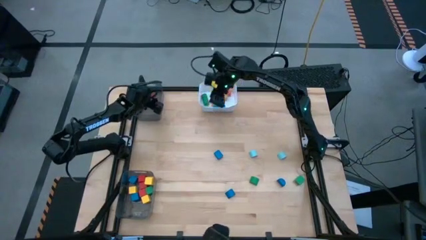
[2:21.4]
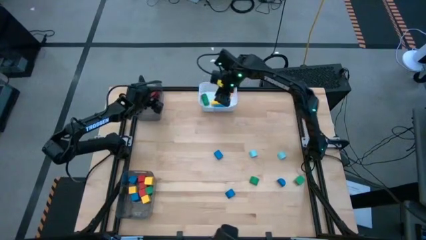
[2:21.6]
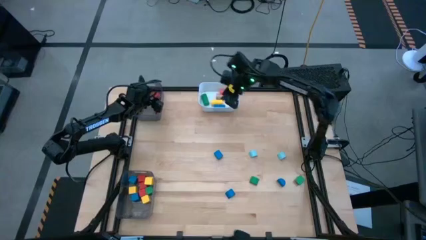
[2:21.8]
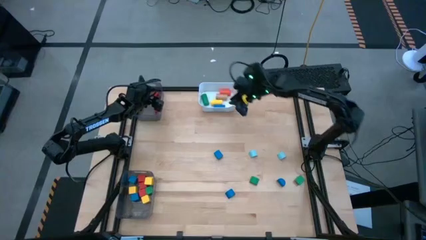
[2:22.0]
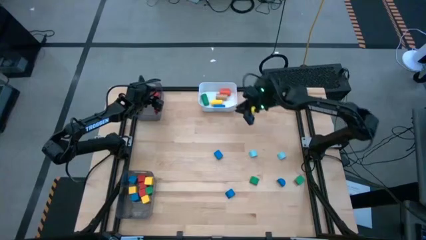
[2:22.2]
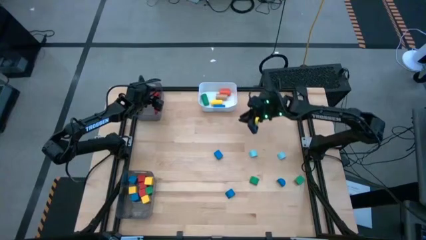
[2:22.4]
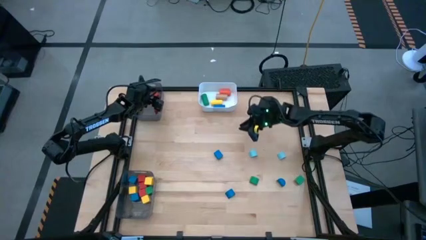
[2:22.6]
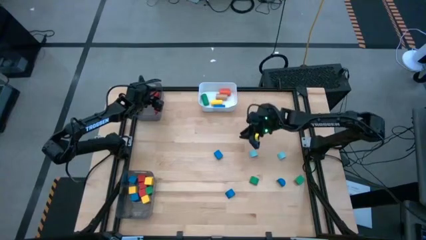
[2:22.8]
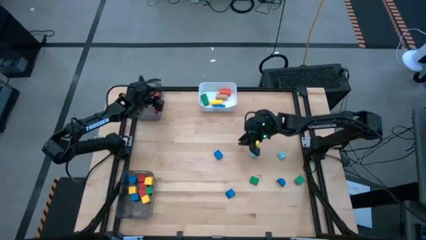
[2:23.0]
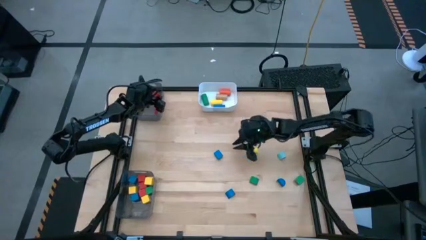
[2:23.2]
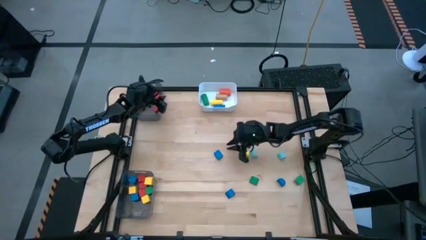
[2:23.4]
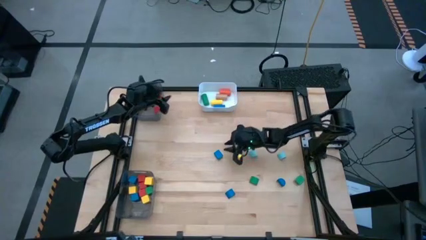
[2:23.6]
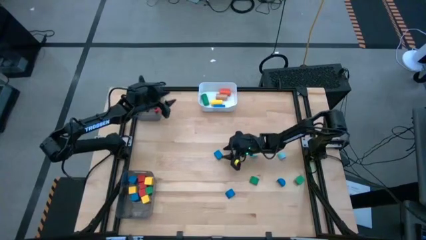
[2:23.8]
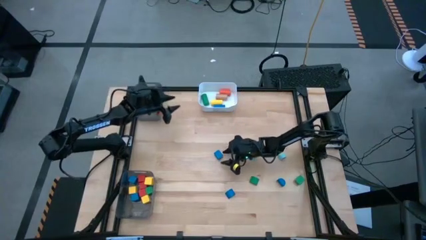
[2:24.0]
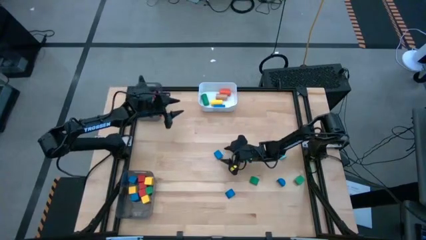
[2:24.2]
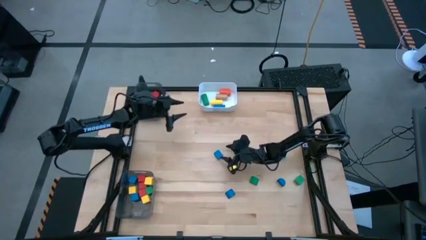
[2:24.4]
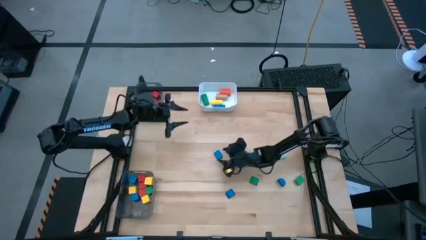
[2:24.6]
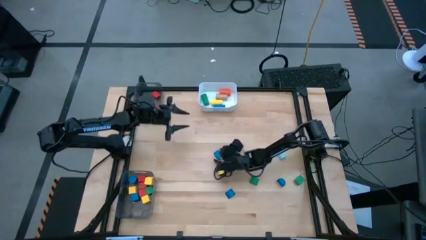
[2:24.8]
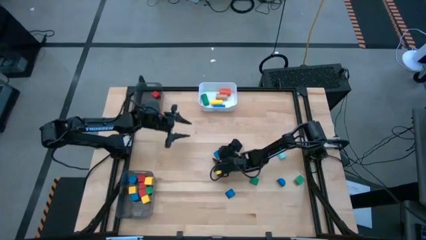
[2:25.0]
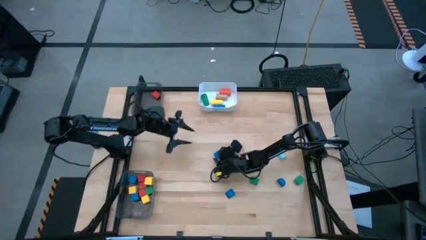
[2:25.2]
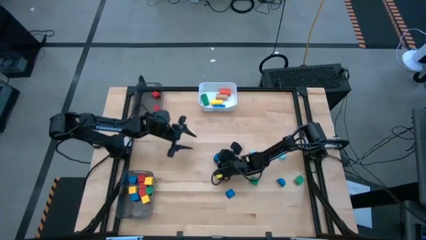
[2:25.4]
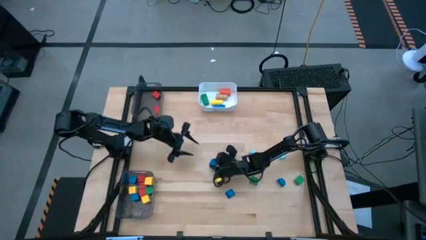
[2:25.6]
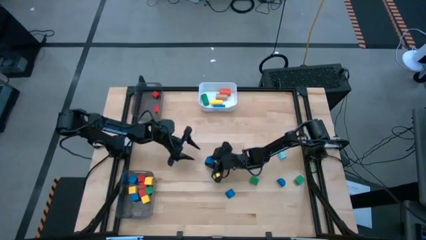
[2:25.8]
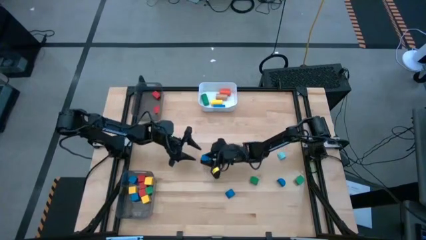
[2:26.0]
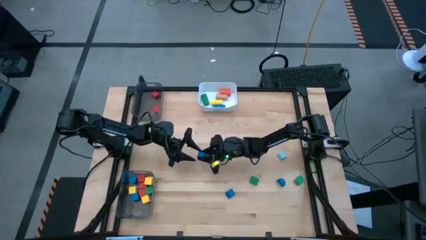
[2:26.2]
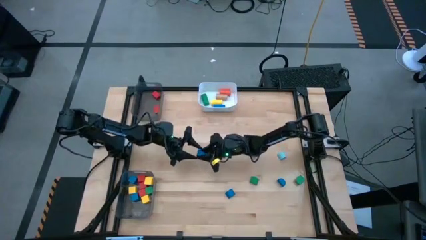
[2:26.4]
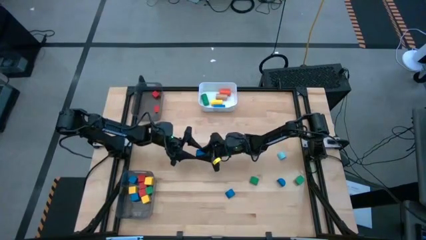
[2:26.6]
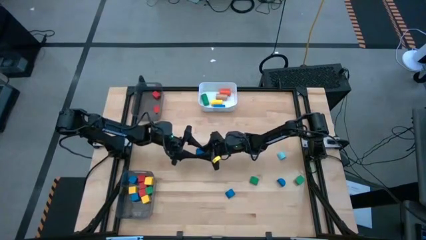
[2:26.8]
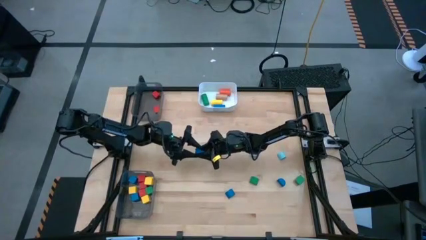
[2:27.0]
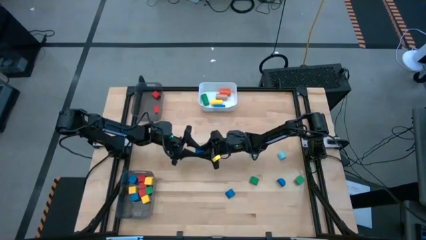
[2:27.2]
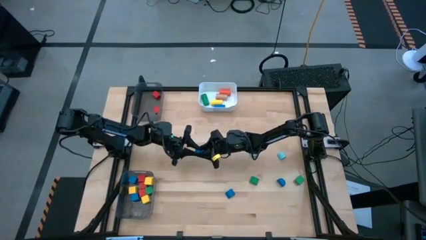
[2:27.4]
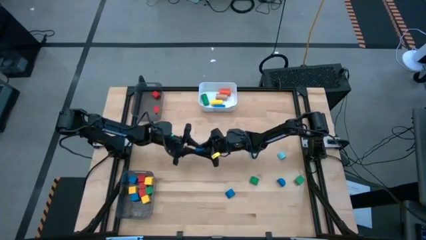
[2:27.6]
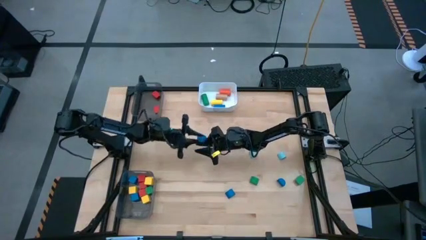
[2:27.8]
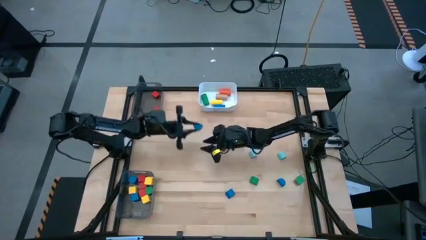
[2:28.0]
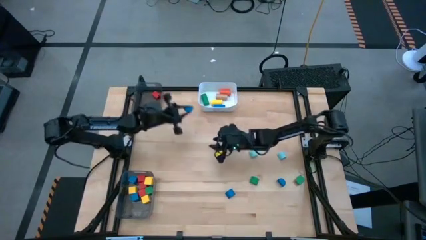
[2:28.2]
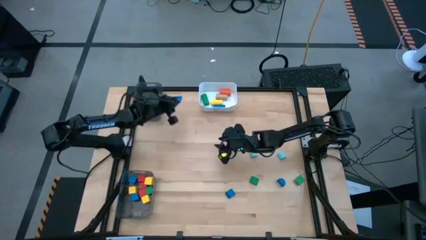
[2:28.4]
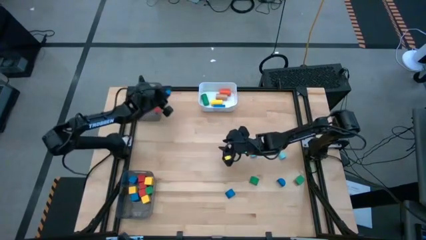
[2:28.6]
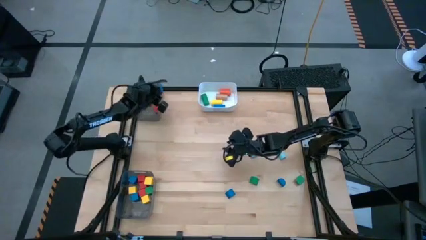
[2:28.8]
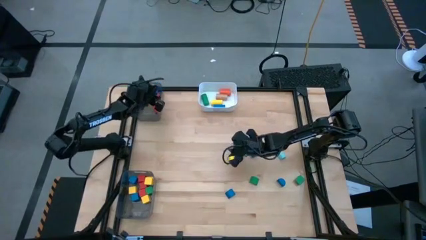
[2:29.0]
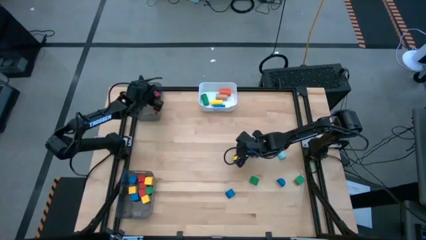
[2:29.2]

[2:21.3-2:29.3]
Task: Sort blocks by size
Put the dark blue semicircle block into the top black bin

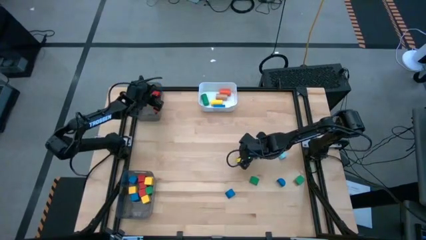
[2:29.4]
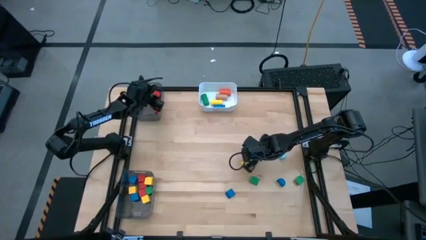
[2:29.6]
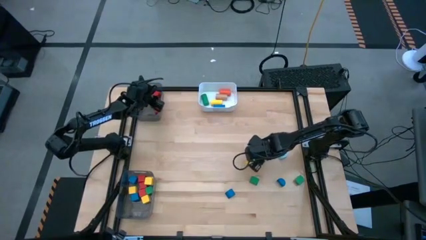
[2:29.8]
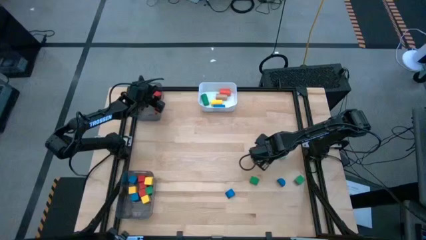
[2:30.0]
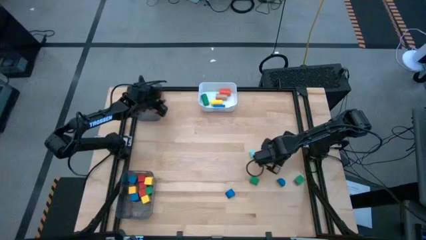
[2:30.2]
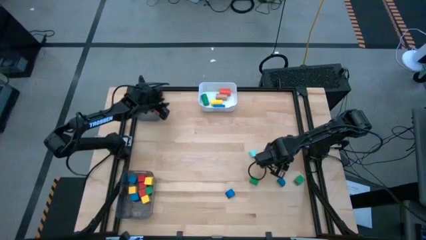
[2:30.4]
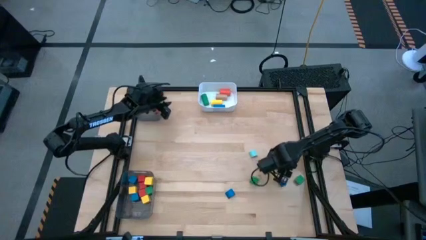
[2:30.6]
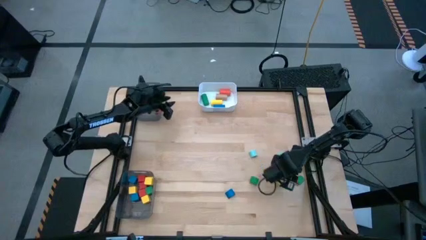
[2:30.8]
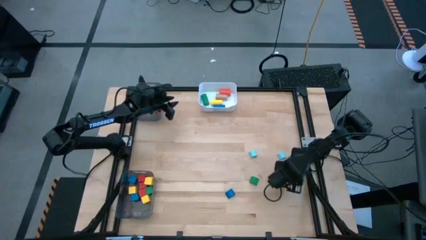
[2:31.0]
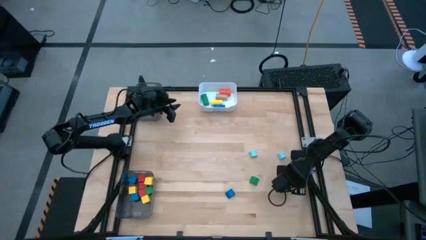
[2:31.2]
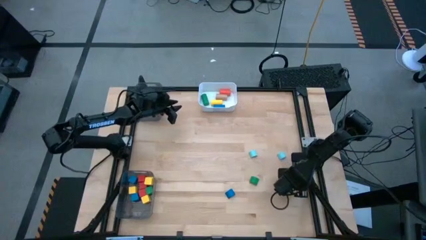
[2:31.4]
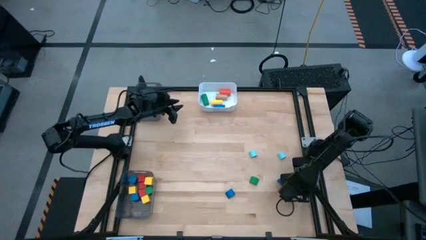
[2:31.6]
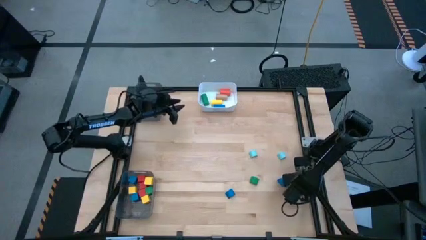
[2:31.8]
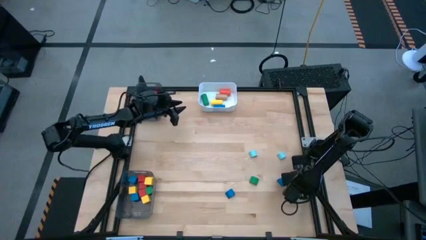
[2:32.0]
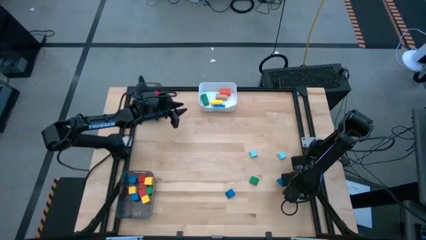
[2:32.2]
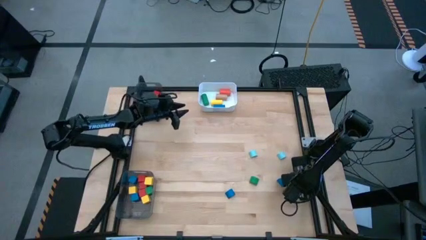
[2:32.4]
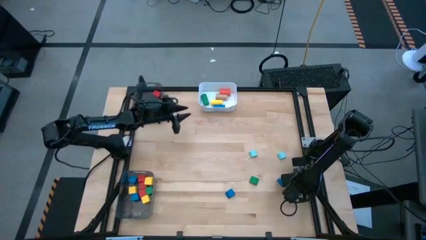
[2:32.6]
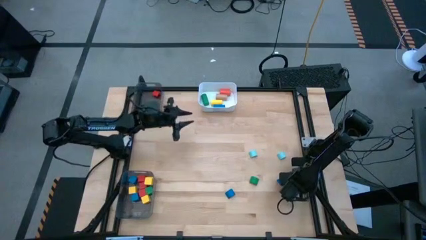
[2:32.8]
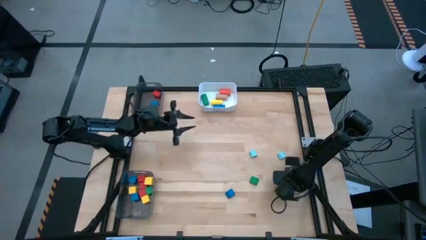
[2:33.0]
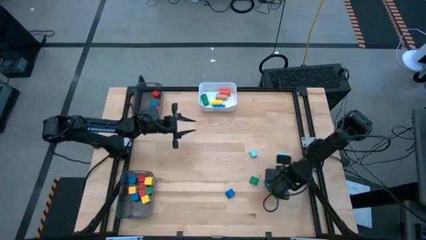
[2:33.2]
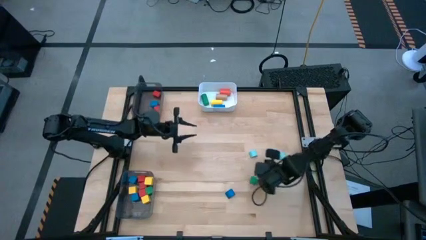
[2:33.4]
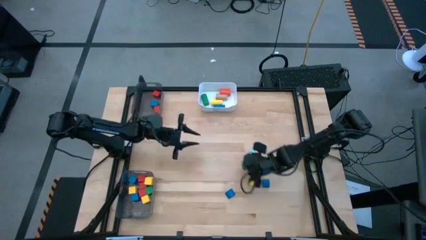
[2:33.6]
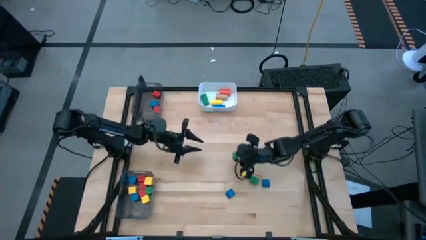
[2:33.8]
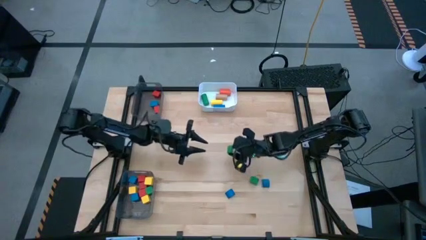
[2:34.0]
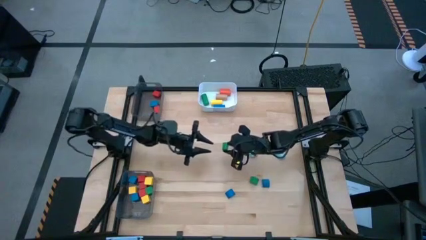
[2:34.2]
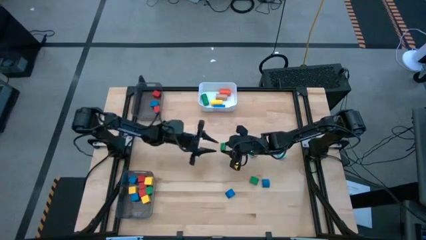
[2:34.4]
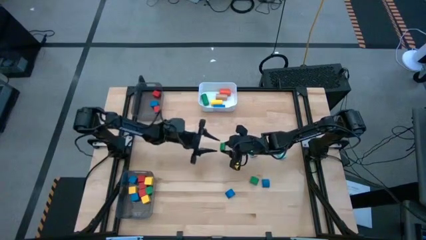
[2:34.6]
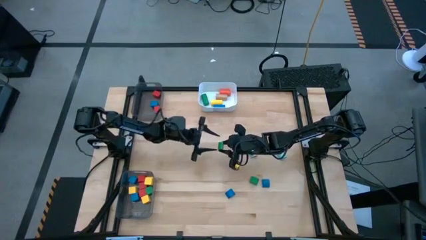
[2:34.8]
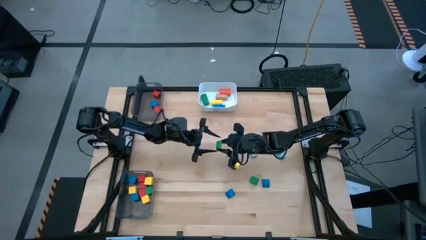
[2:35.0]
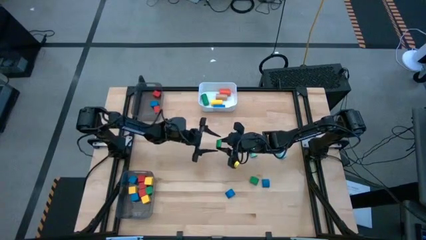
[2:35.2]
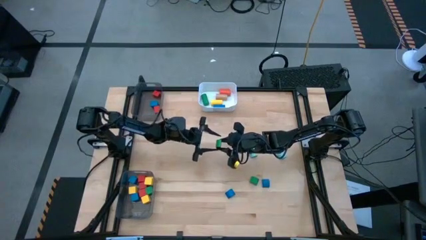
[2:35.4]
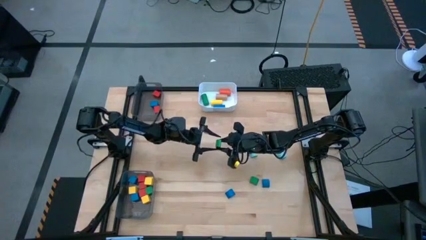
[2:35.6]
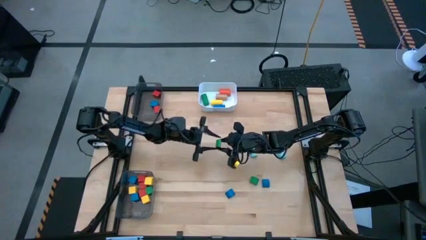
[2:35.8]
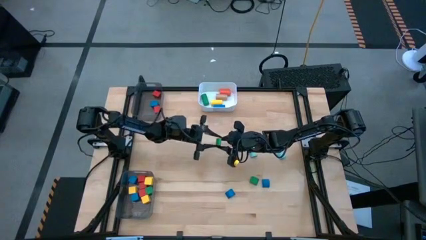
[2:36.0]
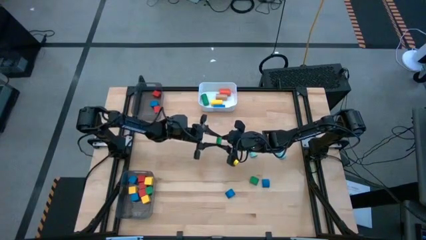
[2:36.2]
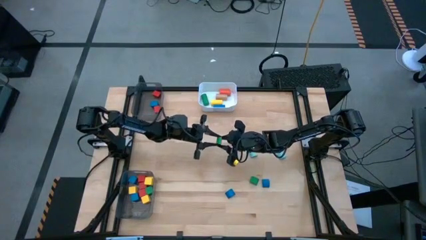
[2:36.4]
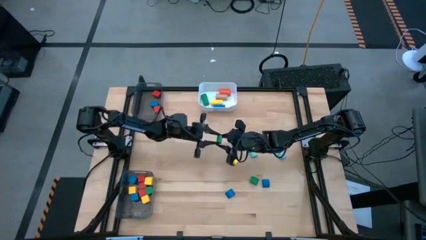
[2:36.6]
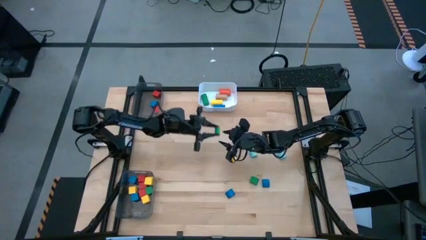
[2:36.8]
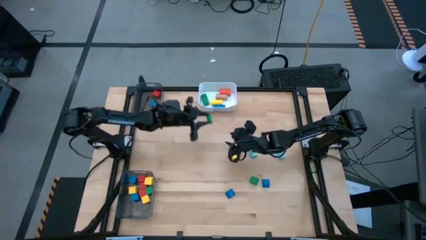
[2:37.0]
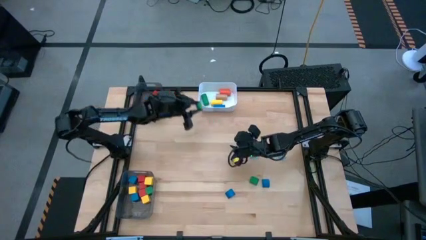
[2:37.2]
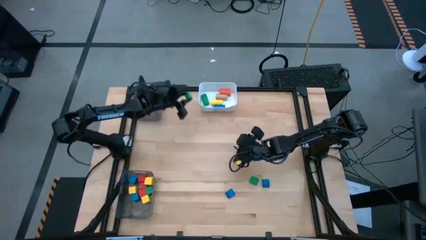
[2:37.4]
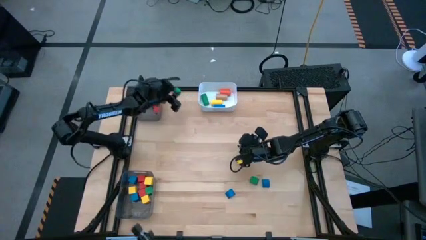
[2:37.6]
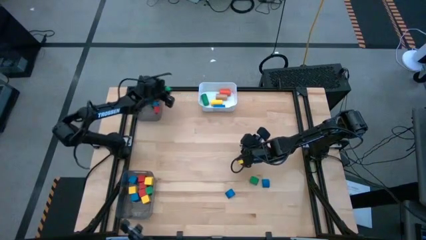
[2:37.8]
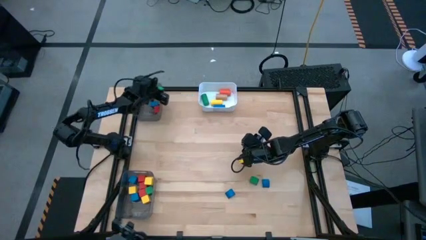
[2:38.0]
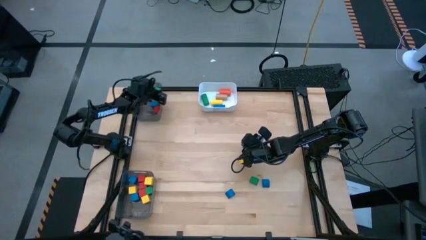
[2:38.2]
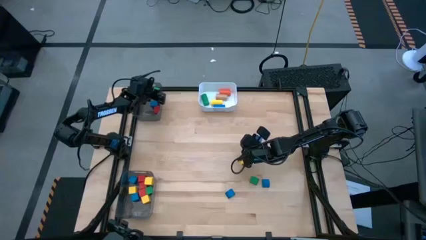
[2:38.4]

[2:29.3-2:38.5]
Put the green semicircle block into the top black bin
